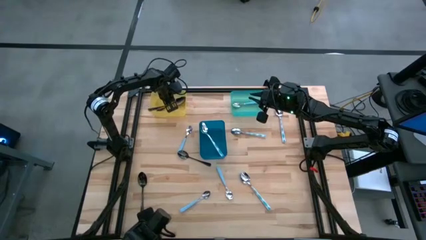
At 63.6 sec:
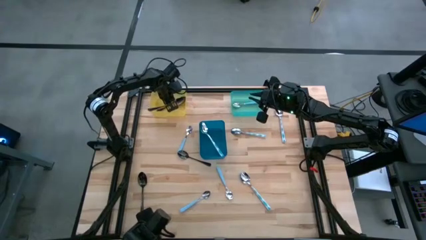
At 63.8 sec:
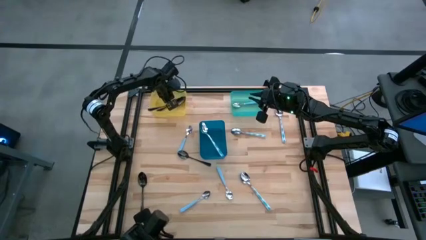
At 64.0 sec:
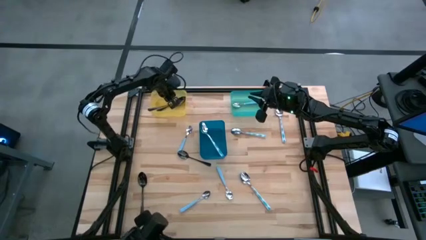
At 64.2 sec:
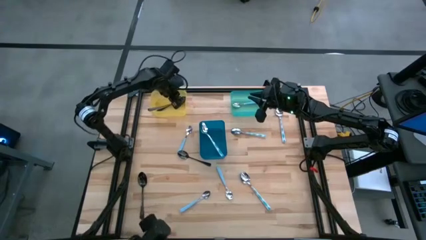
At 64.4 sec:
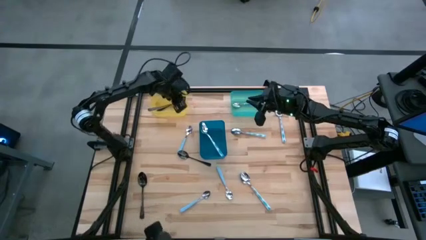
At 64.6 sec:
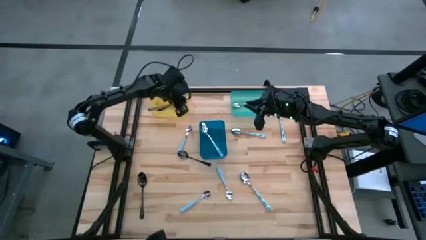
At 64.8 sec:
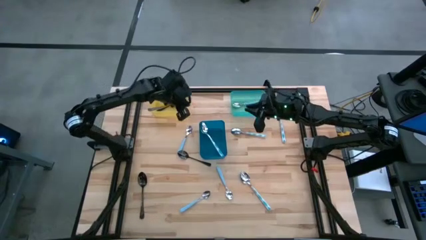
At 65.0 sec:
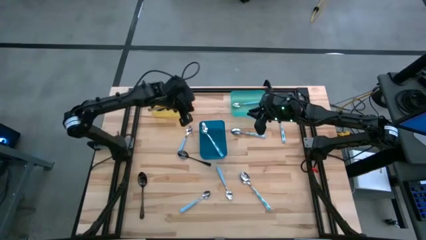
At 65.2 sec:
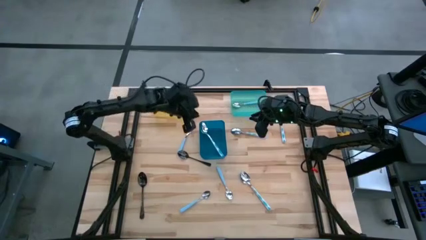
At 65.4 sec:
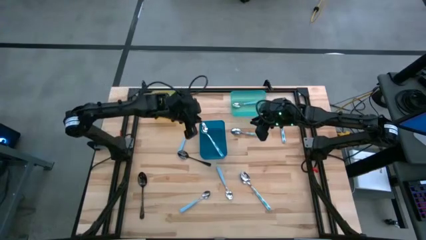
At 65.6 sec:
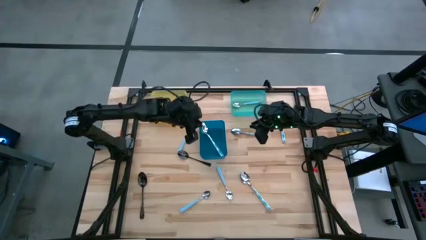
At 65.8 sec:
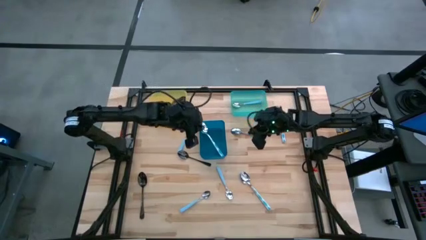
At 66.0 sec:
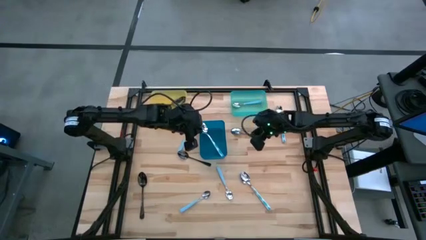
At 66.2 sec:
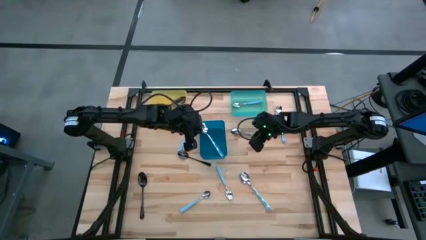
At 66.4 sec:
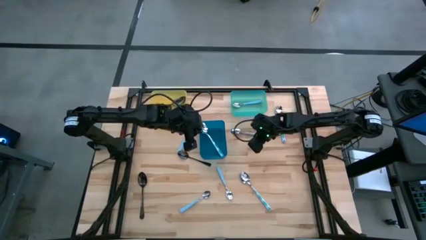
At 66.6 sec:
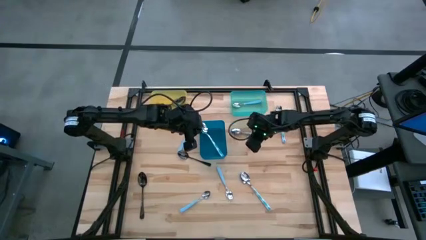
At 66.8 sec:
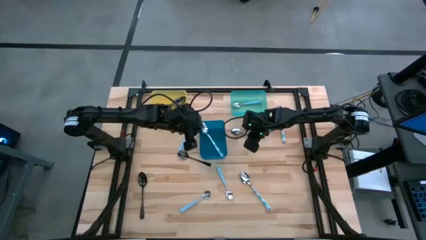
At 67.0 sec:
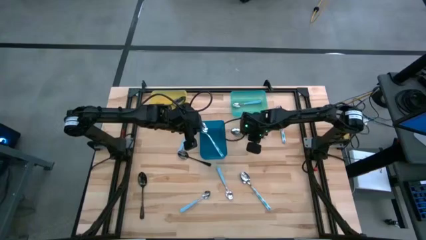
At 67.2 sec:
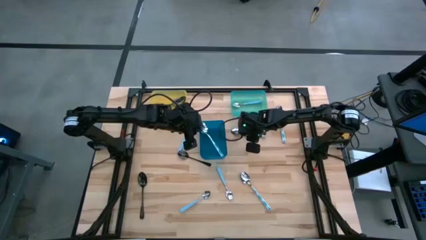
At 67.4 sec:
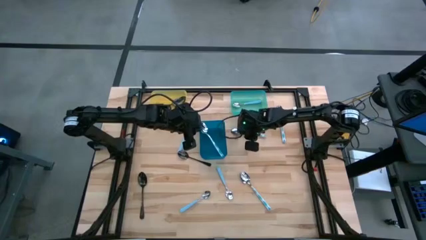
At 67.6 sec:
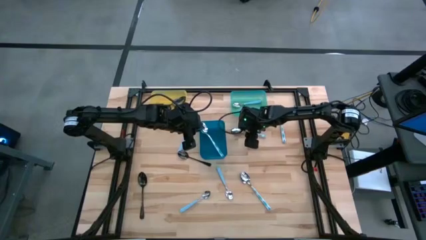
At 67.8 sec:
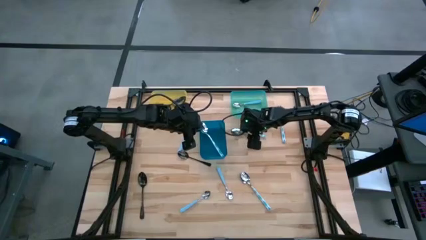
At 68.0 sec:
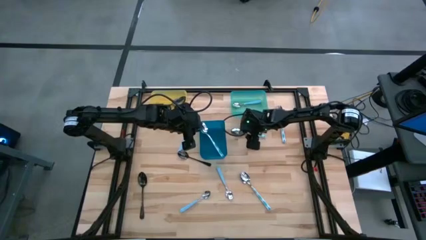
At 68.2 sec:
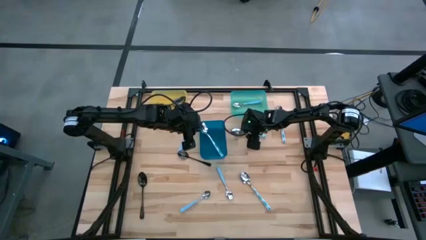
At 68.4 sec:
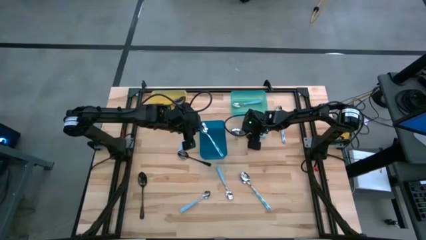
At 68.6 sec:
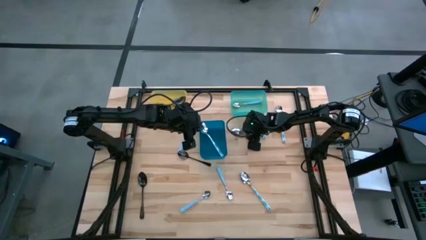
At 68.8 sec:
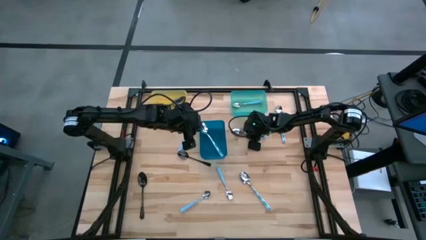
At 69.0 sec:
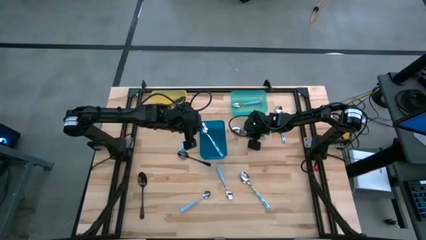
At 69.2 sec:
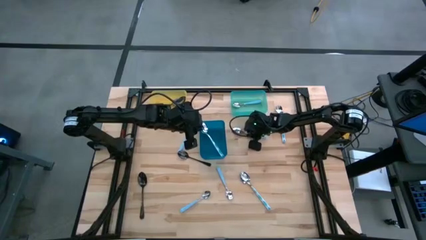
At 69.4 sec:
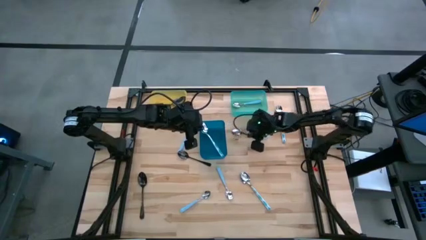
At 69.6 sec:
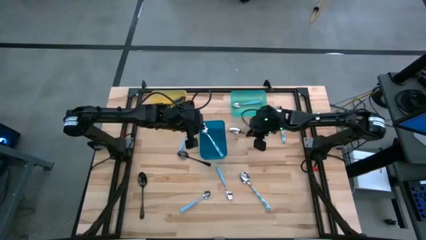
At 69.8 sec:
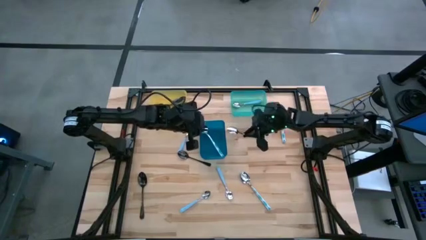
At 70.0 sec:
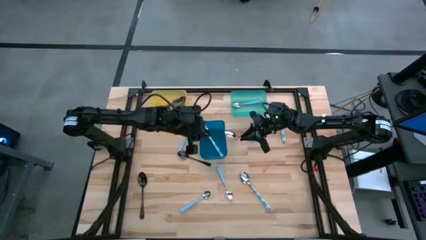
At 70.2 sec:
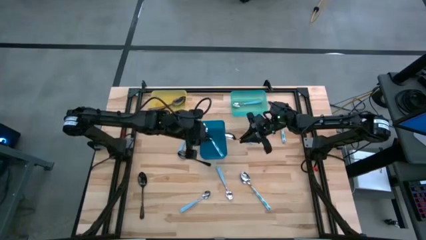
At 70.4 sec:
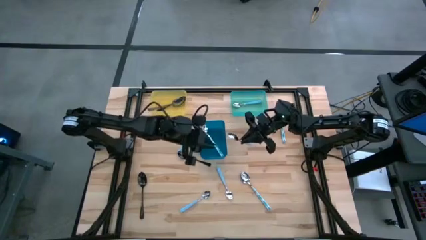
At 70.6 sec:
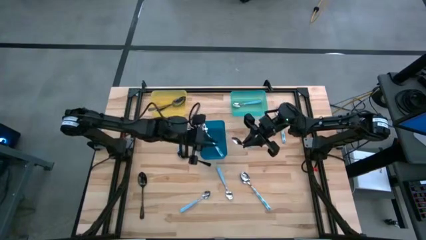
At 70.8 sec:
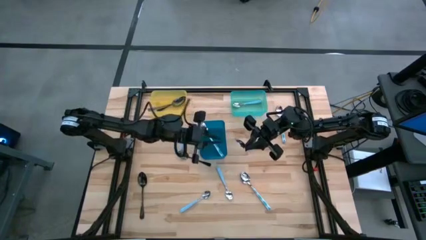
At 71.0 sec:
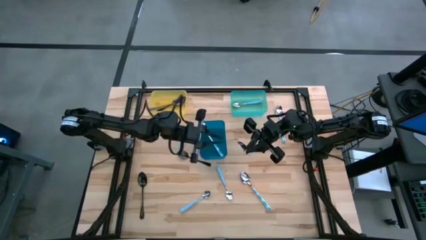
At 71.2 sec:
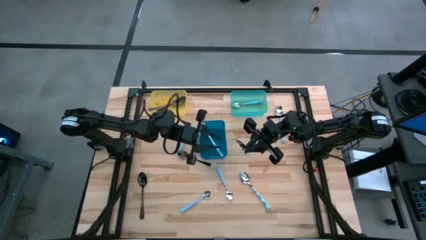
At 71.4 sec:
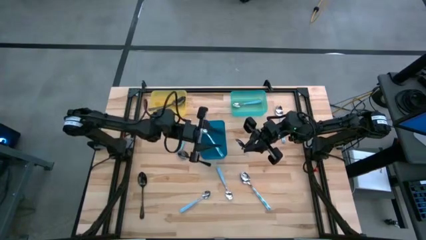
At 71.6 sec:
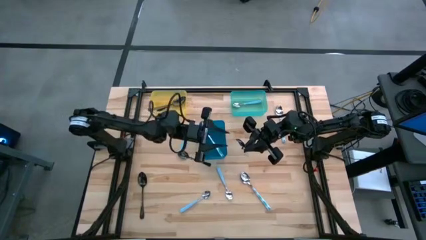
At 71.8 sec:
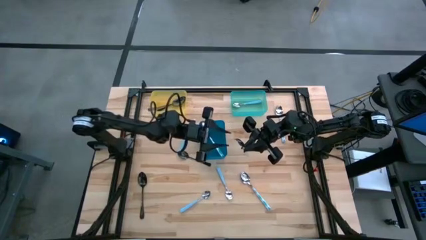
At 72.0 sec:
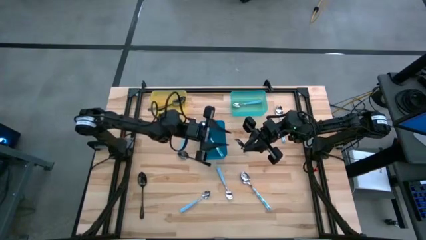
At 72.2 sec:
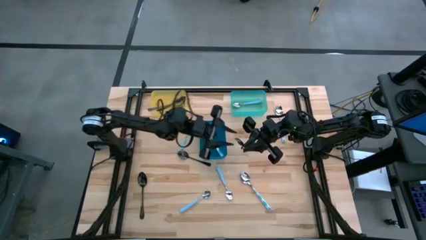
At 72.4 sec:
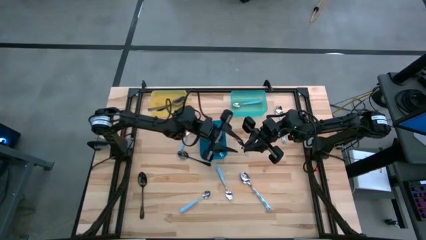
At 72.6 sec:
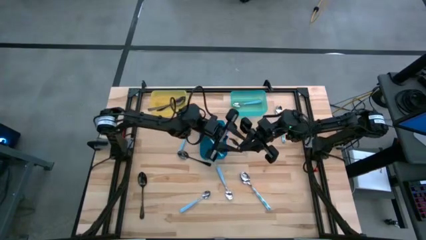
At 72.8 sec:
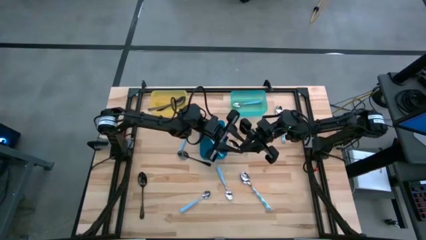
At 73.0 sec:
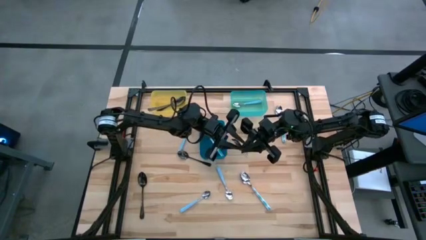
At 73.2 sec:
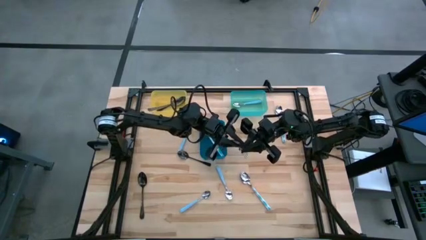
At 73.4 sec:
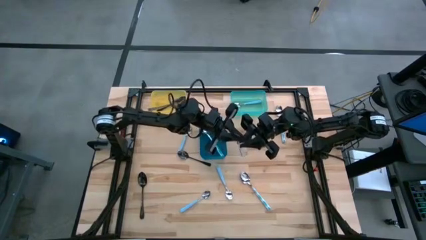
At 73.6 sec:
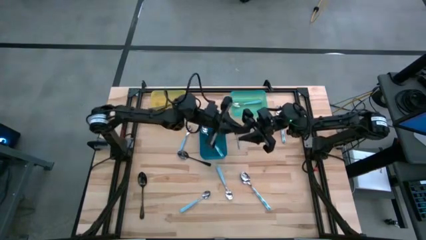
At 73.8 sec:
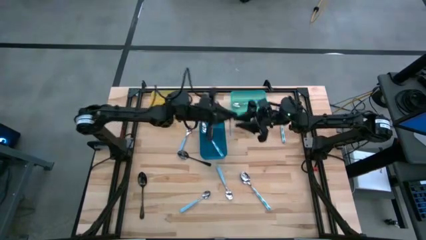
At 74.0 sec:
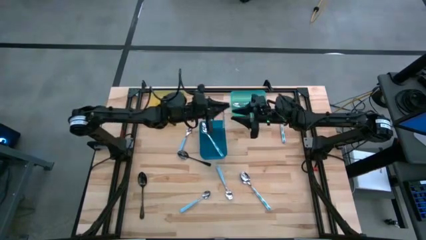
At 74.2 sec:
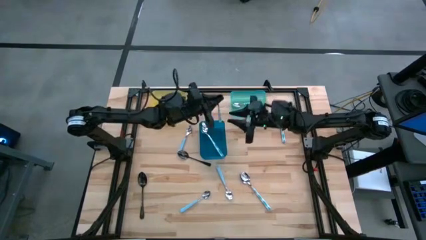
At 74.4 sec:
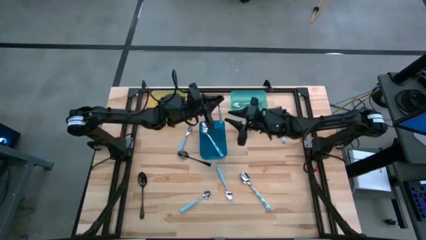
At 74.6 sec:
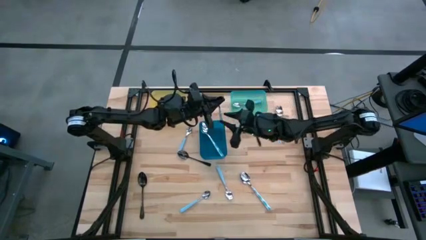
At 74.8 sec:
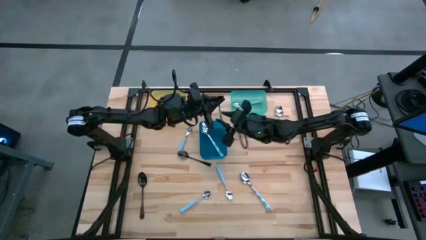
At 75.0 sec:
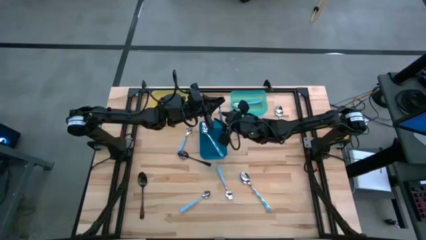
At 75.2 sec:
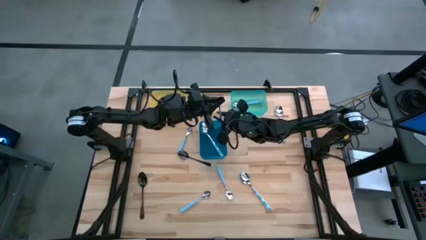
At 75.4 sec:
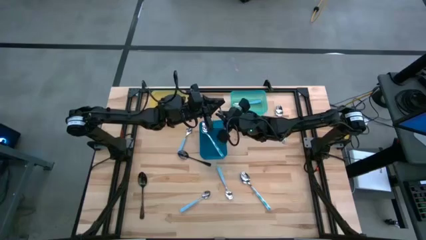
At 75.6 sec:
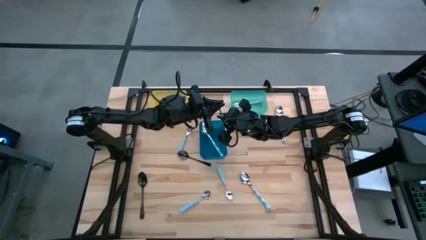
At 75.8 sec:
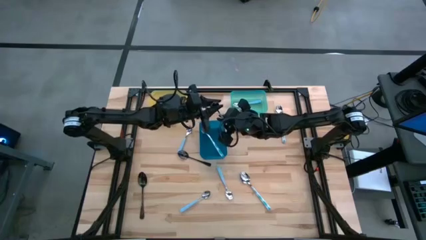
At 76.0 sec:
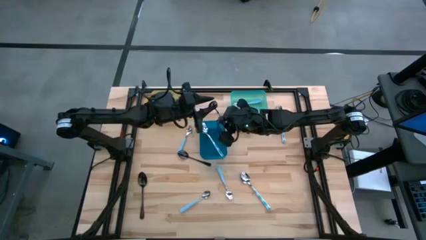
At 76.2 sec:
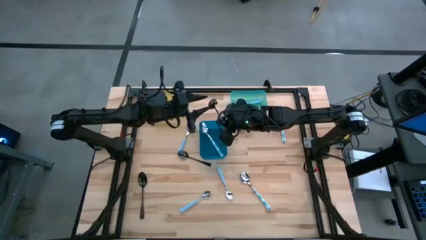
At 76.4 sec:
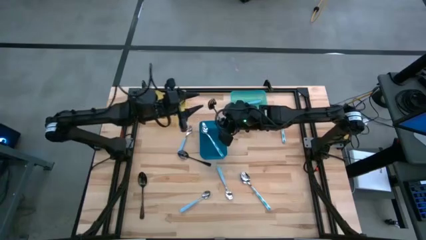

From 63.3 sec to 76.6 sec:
Task: Sort silverware by color (type)
Put the white patterned spoon into the blue bin
